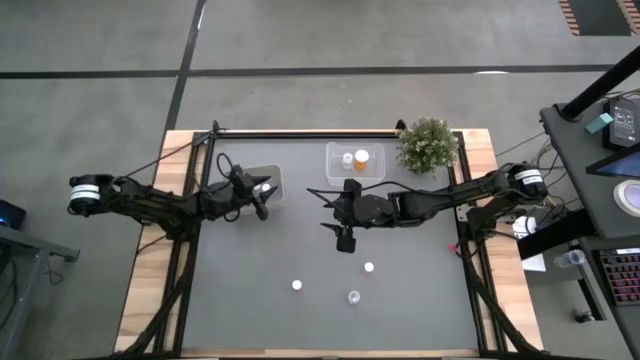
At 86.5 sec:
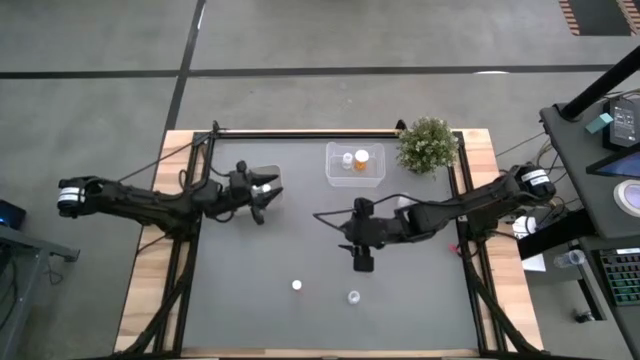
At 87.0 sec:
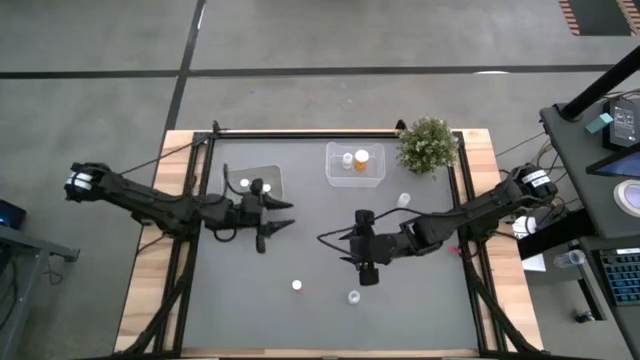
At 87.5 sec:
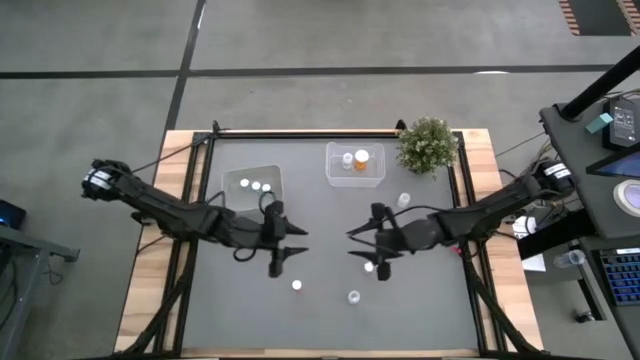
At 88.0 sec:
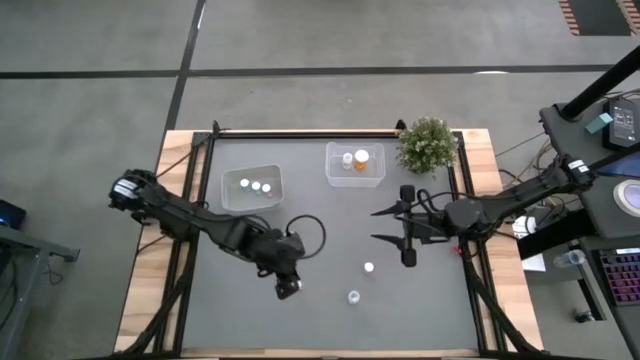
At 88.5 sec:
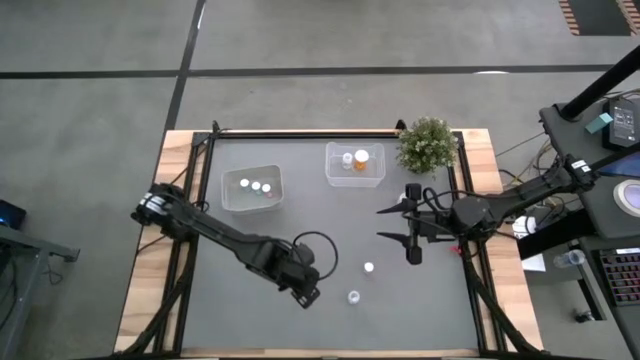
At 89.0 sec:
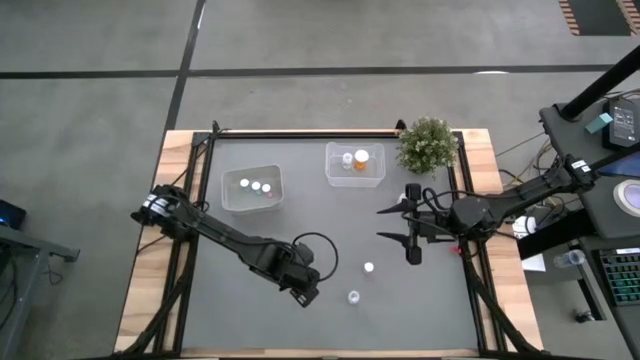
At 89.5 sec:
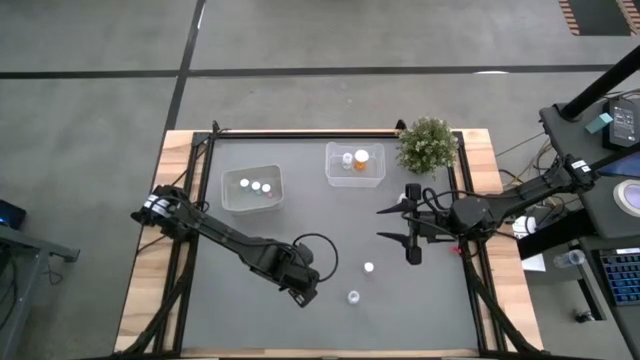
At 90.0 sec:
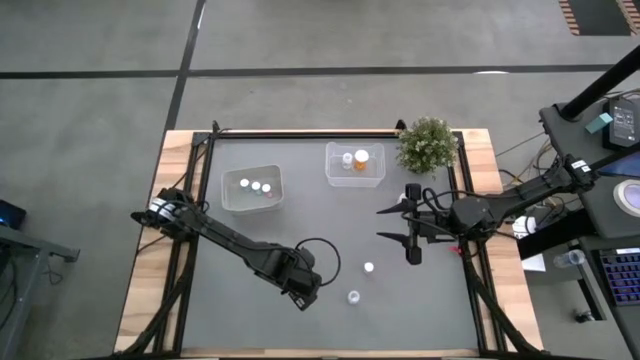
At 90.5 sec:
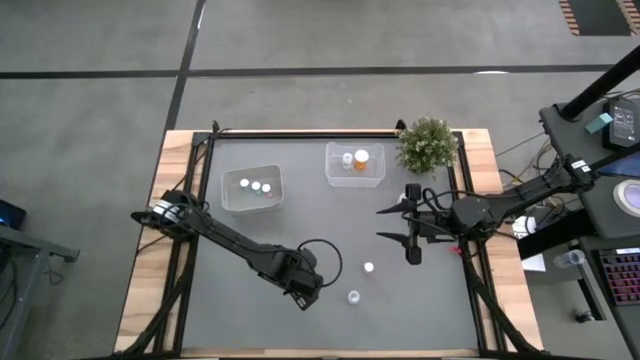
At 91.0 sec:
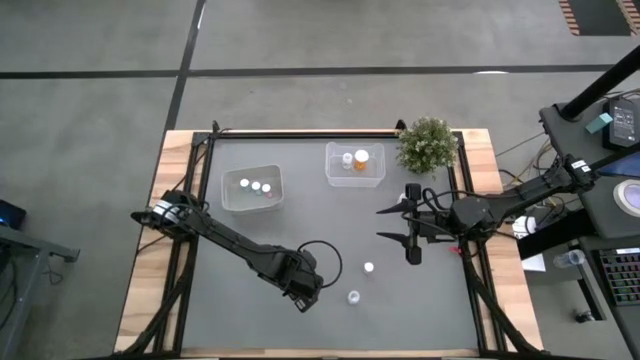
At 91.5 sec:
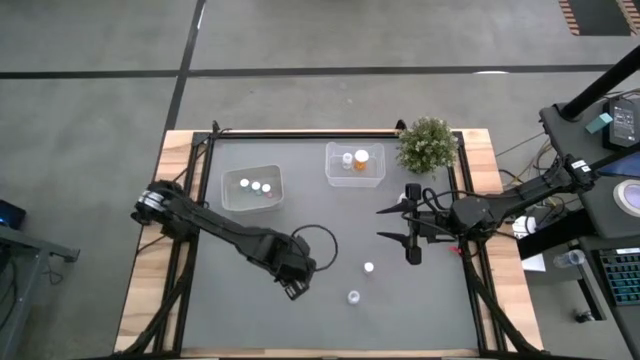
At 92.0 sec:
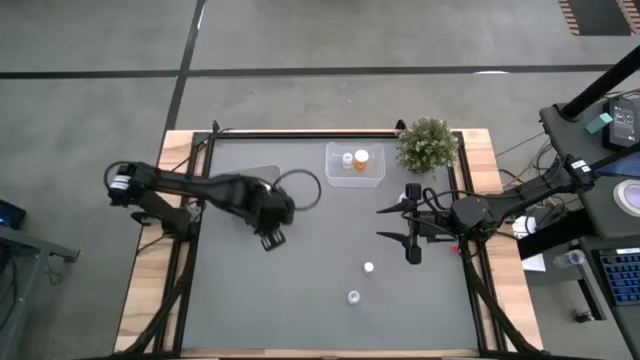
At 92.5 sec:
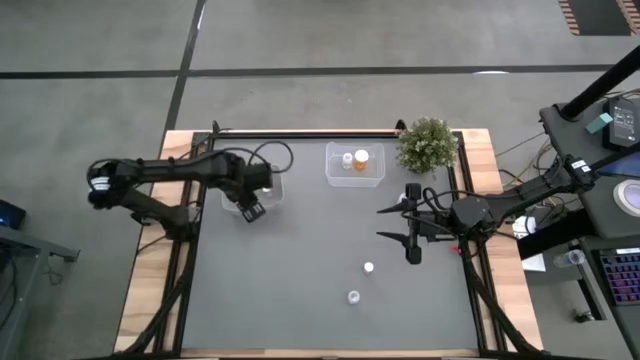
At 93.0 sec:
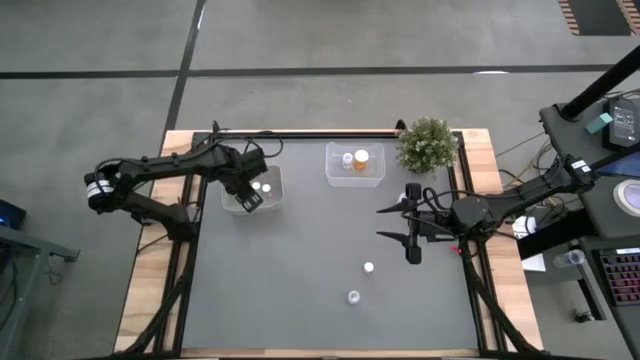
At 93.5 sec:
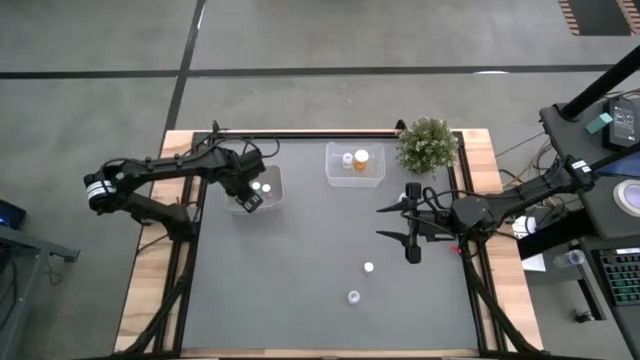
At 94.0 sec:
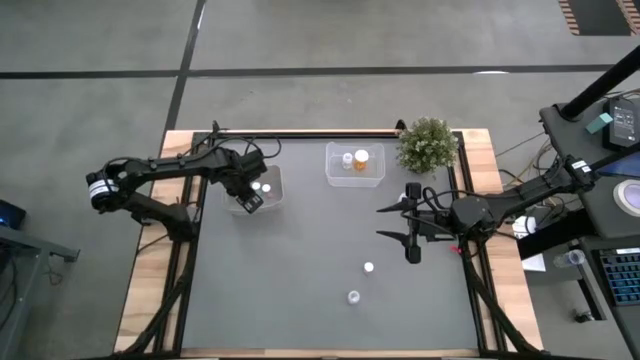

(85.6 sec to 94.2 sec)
Task: Pick and place medicine bottles into bin by pill shape (circle, oval)
Put the small red pill bottle into the gray bin
